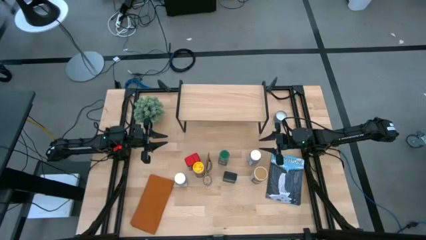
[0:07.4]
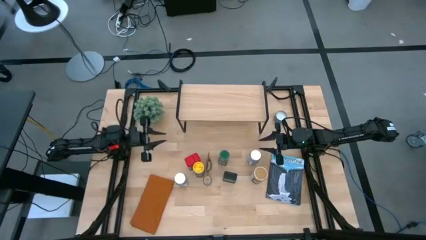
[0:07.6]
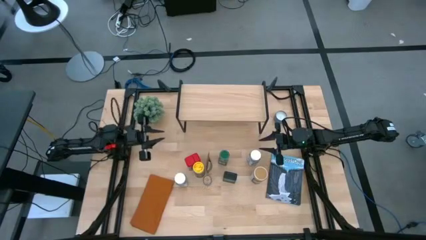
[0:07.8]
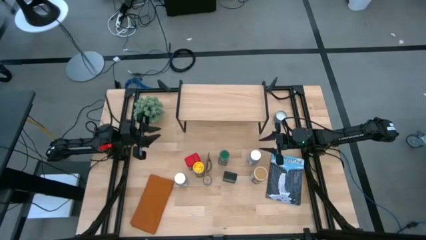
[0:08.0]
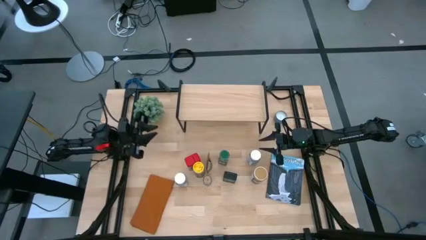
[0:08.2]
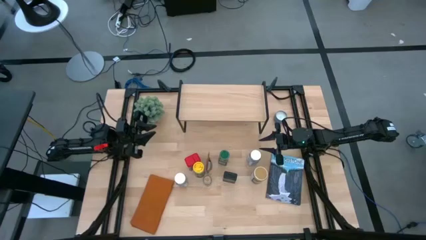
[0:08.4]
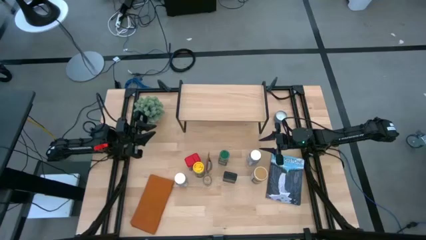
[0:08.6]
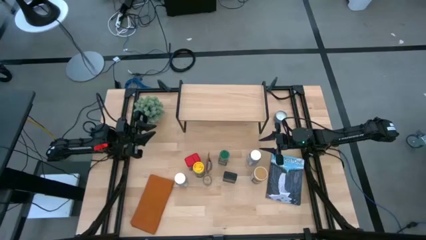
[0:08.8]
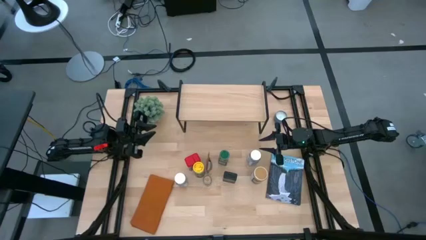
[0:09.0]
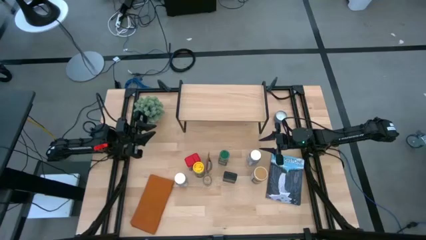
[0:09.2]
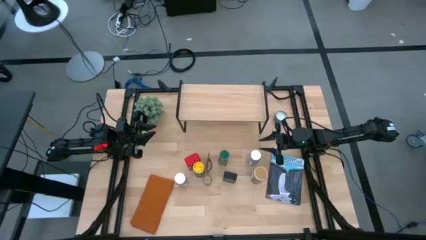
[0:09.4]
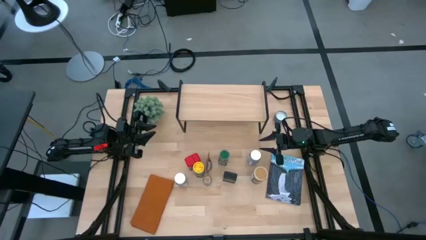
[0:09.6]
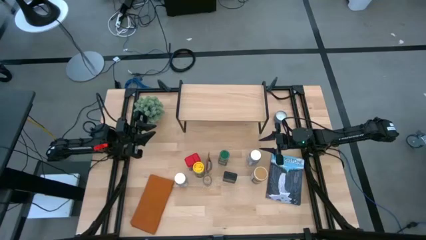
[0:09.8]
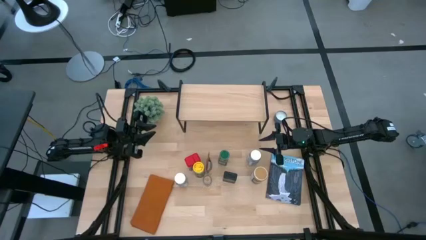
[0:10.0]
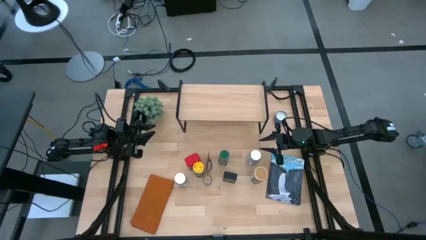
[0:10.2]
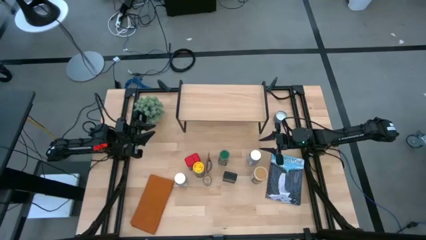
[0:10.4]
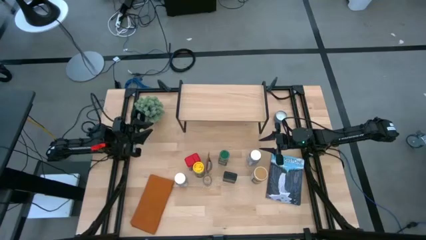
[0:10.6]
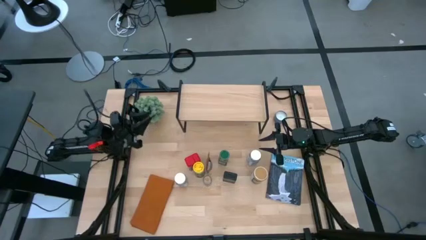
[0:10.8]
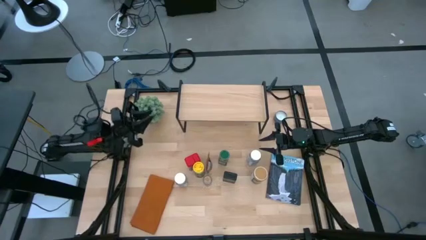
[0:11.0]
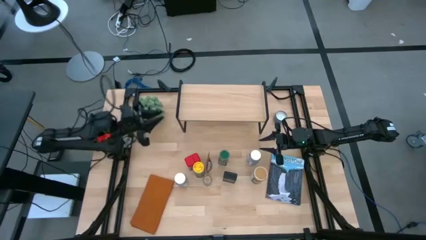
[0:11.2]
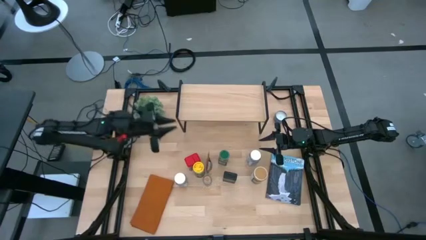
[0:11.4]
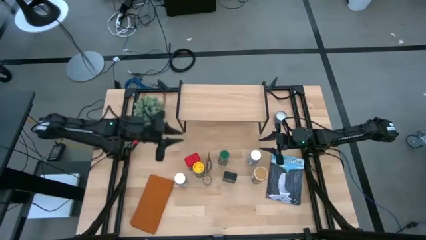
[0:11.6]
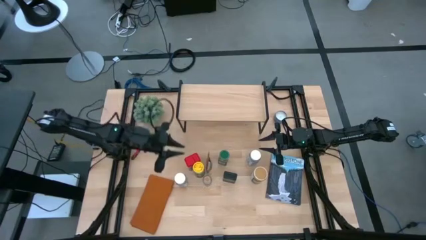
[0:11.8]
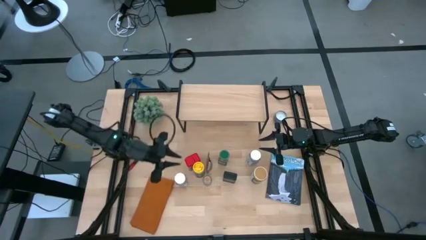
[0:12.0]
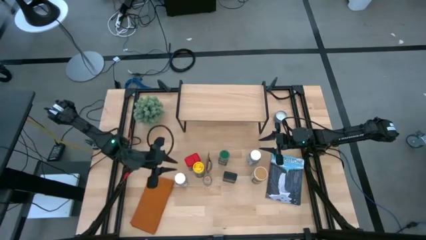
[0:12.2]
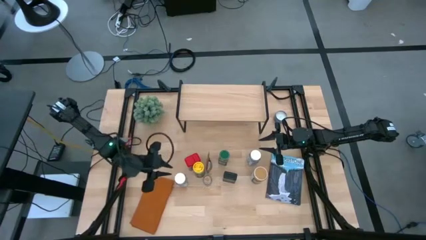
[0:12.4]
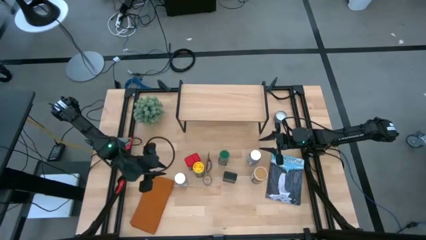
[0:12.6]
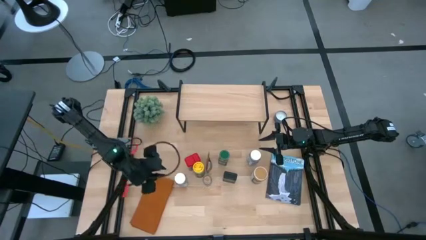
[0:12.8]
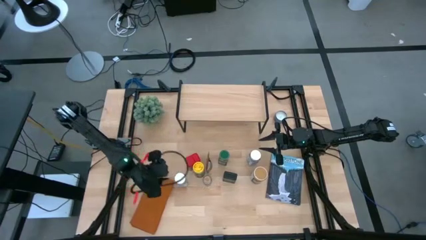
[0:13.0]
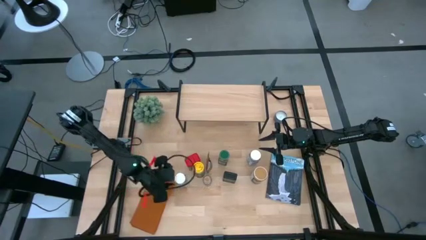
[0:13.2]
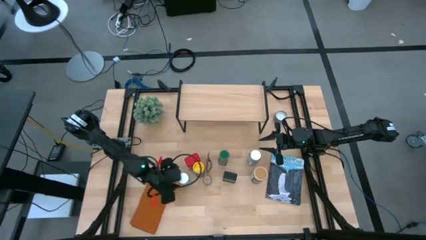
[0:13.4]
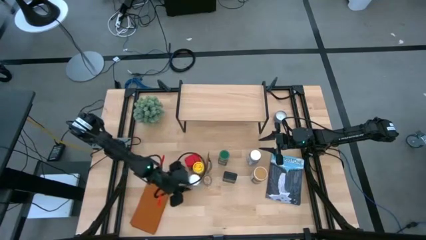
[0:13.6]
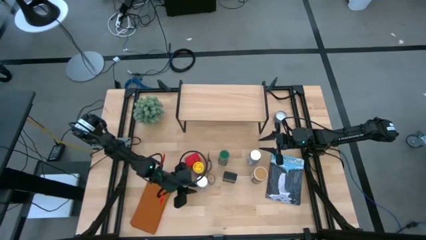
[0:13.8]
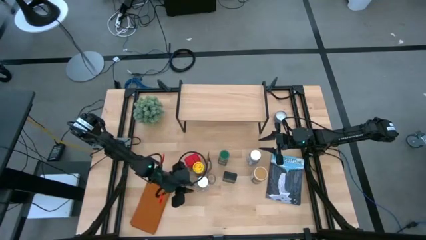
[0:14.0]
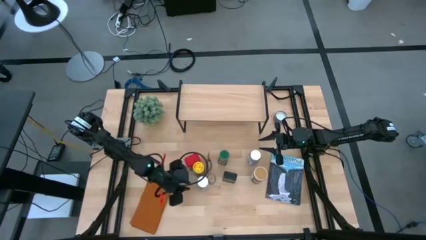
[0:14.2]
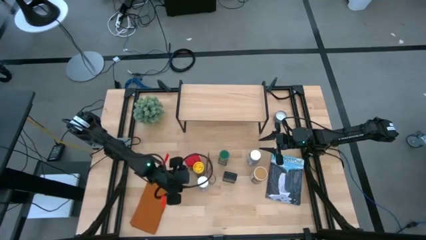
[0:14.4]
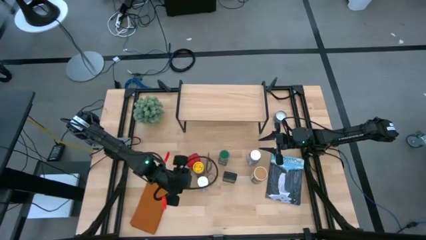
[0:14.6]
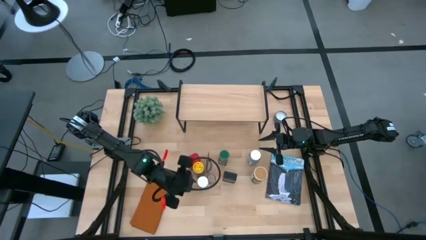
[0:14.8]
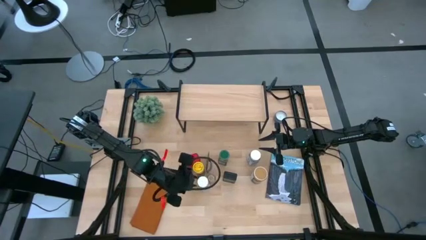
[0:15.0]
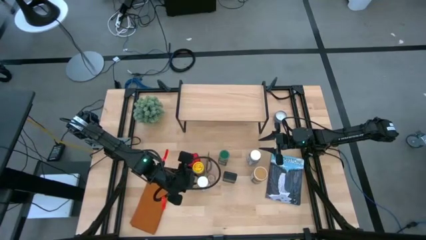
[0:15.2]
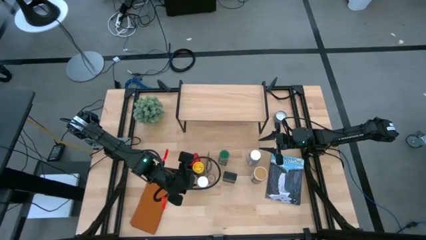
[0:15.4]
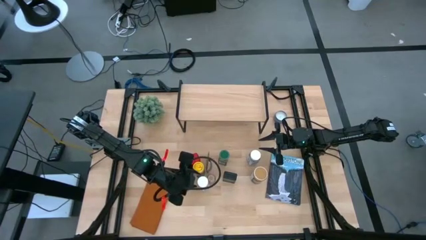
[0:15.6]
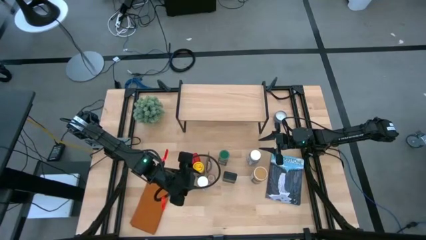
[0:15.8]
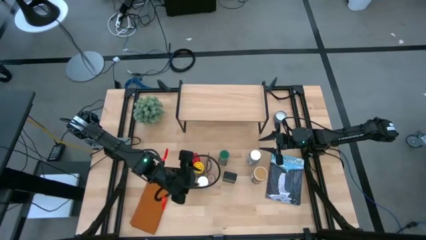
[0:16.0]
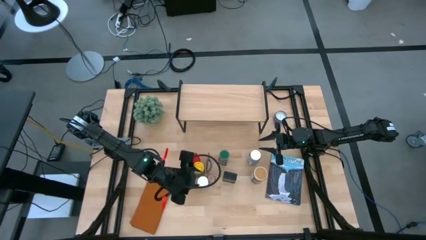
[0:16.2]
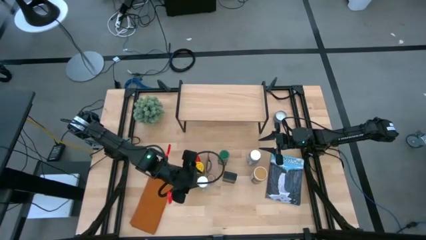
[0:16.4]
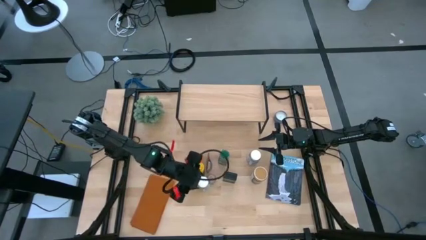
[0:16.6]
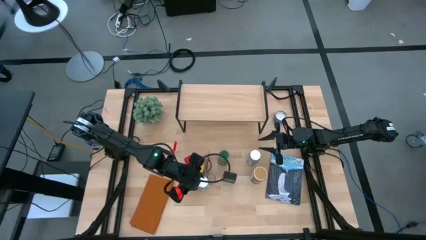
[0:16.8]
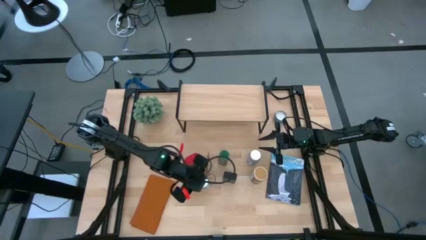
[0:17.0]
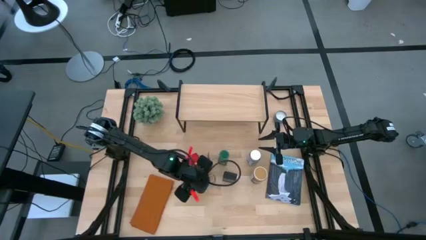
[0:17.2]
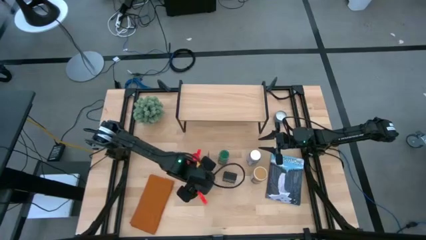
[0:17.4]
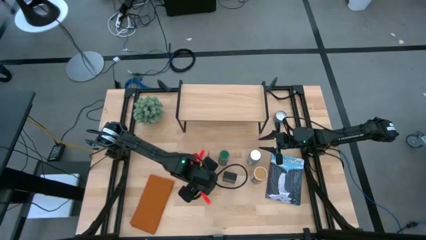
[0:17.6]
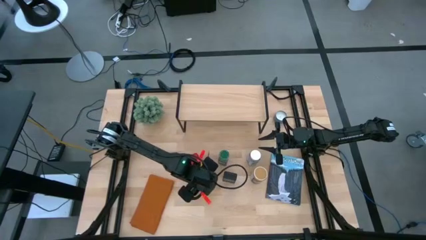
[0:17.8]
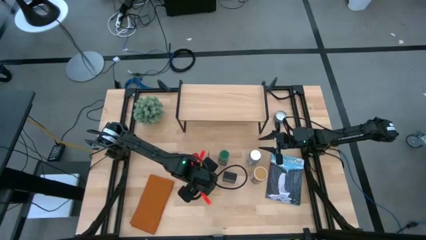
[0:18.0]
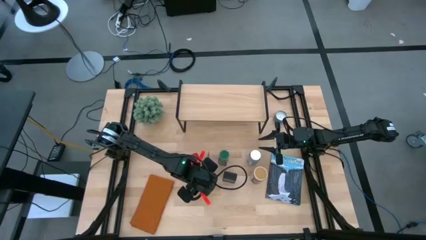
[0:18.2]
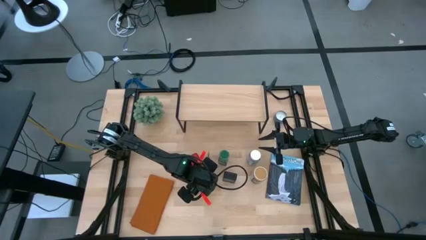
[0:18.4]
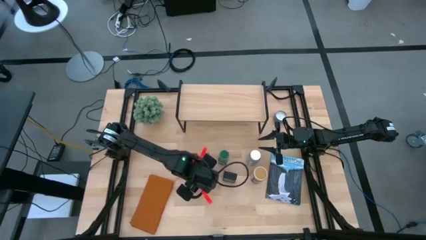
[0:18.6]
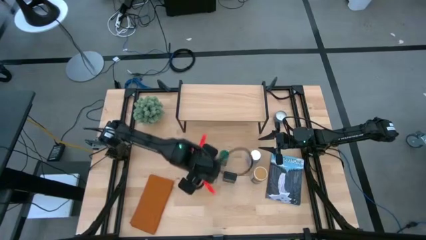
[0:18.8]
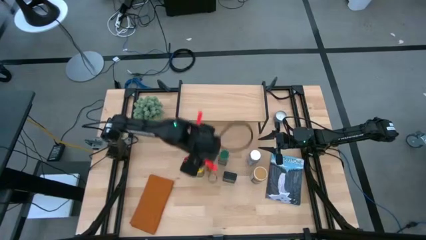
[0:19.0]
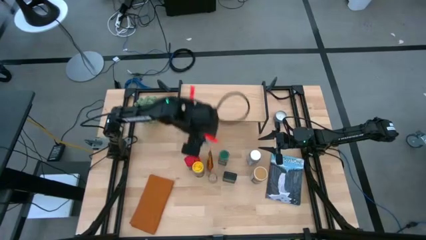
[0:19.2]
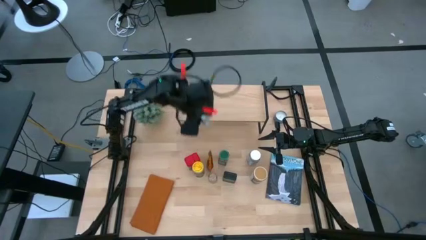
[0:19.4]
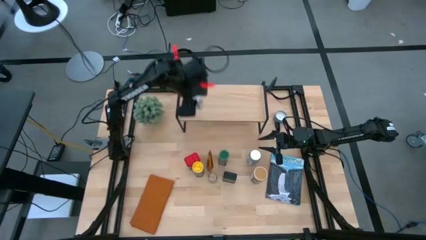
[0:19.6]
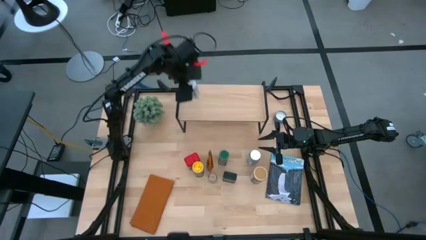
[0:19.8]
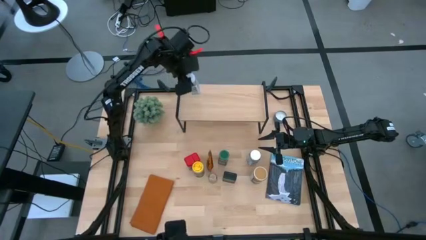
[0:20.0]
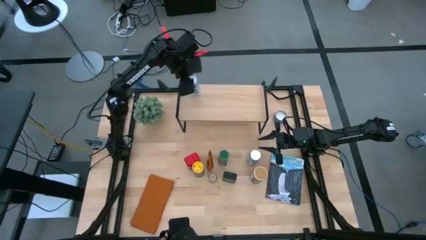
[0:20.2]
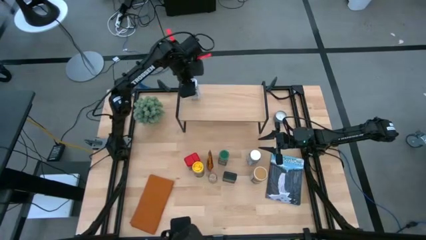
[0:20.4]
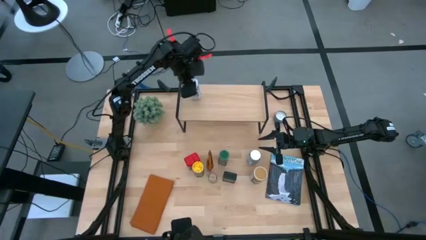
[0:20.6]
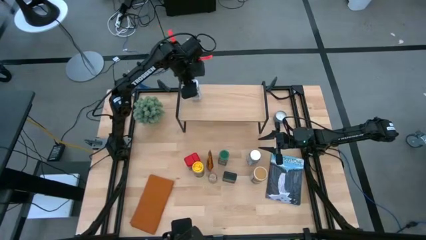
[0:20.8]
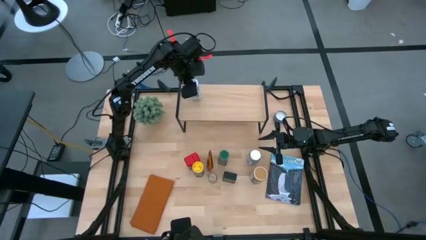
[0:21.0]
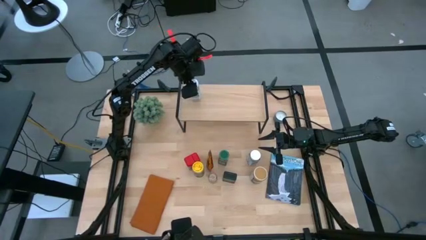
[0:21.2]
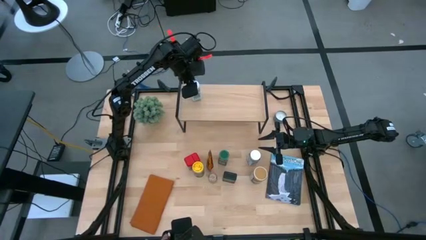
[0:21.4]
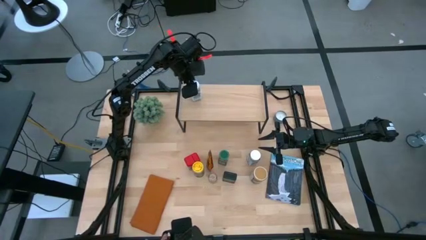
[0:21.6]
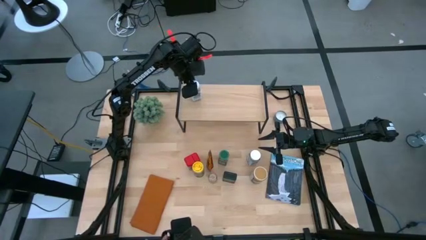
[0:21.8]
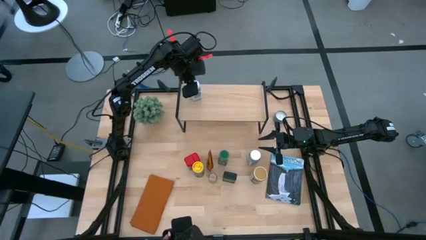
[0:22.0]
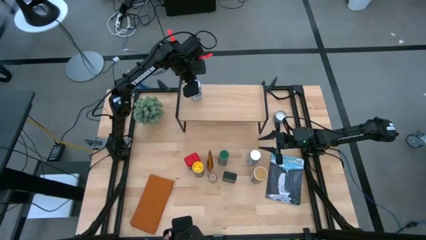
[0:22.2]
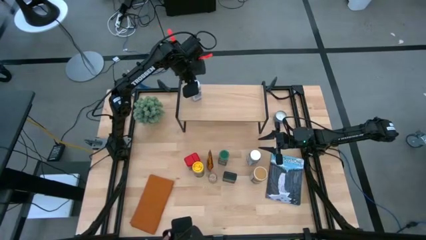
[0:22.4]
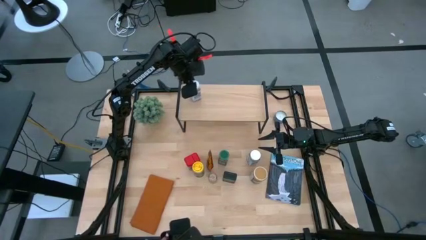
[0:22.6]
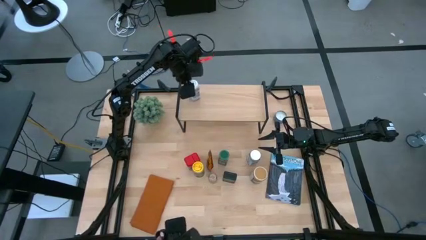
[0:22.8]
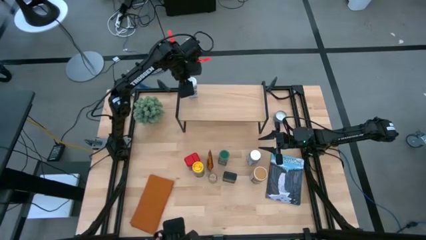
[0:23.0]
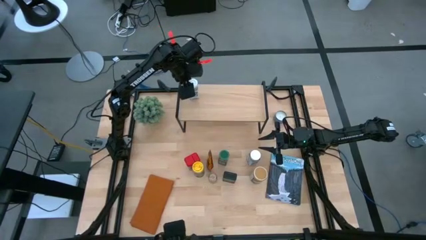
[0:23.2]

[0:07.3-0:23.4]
Task: Shelf spices
Put the left white seasoning bottle on the shelf
